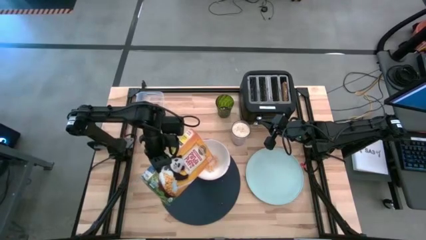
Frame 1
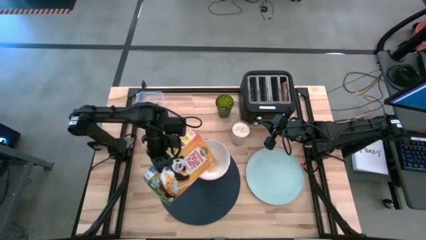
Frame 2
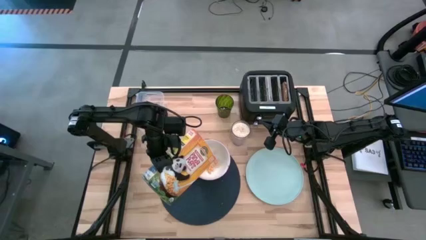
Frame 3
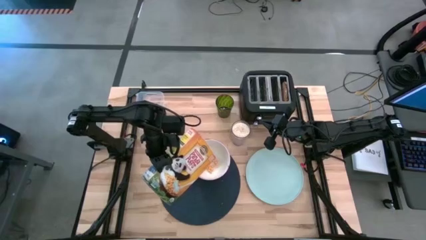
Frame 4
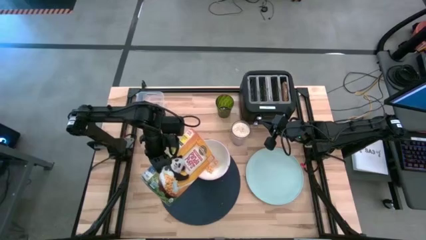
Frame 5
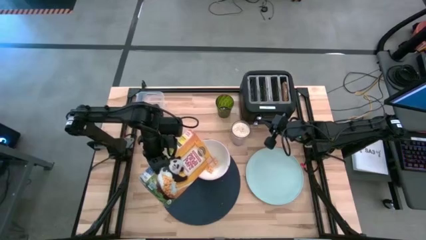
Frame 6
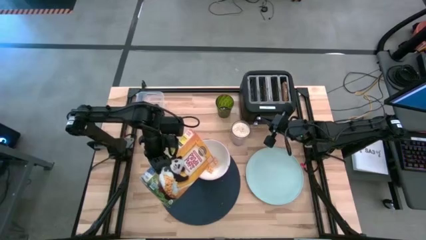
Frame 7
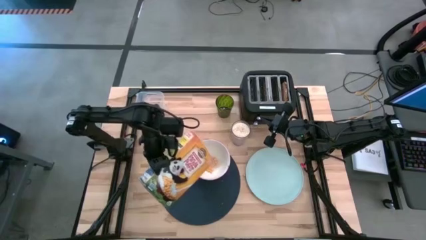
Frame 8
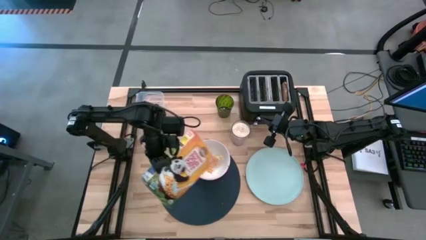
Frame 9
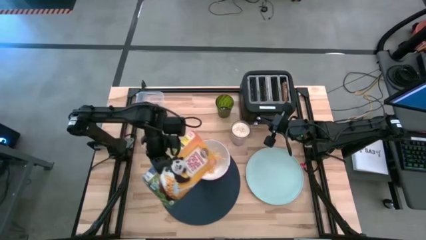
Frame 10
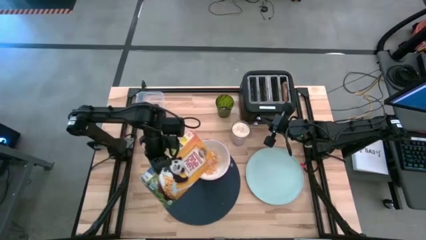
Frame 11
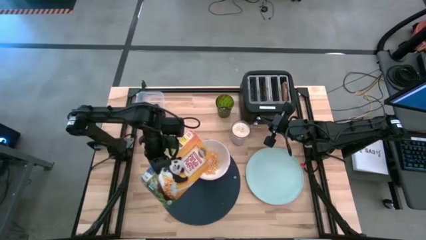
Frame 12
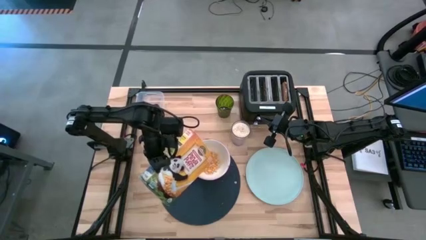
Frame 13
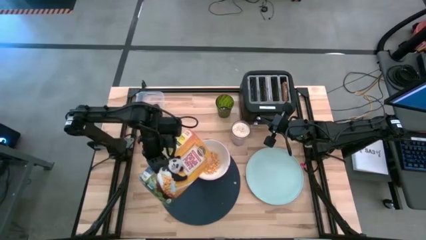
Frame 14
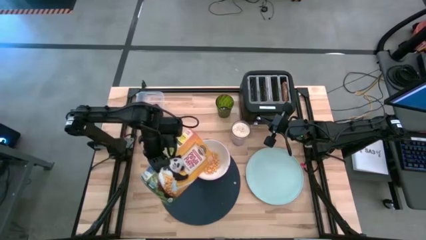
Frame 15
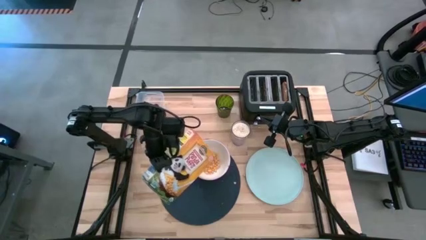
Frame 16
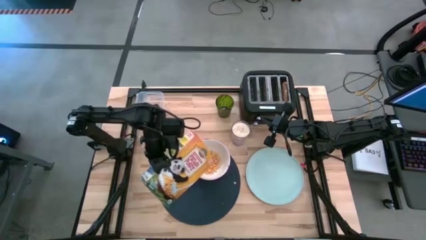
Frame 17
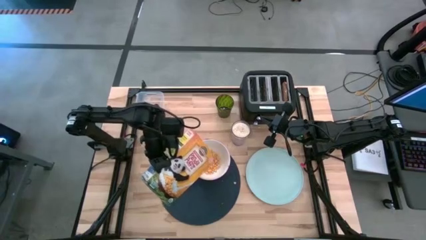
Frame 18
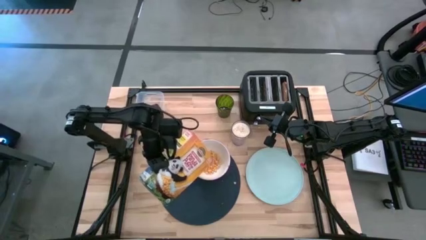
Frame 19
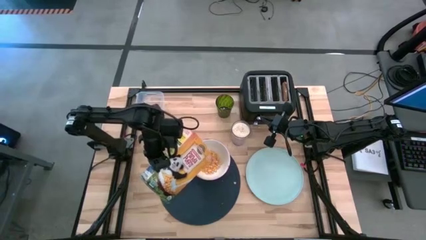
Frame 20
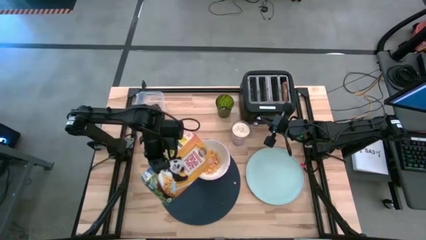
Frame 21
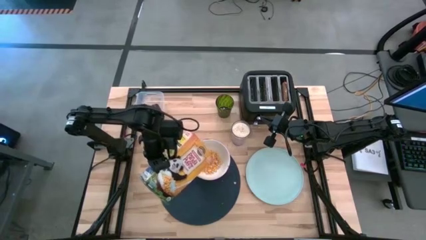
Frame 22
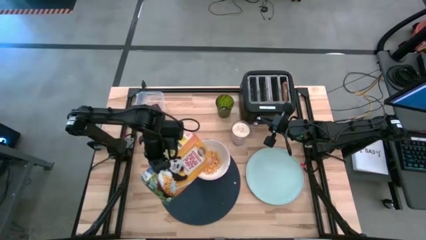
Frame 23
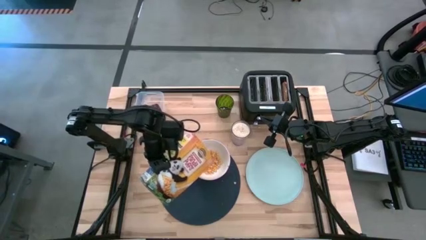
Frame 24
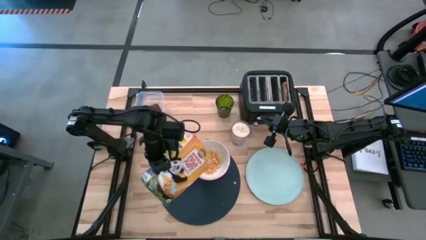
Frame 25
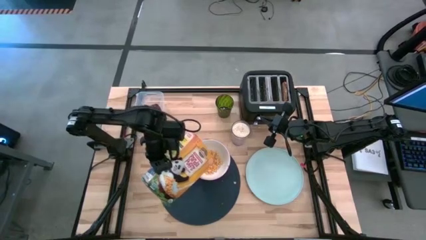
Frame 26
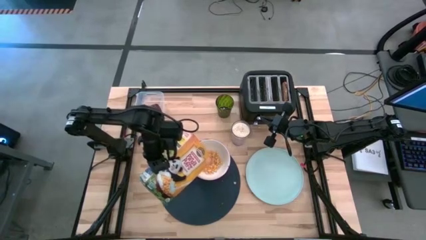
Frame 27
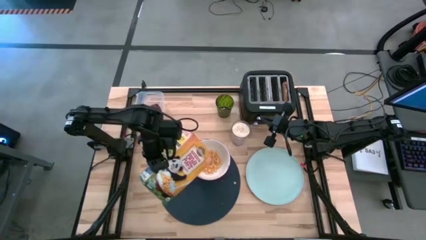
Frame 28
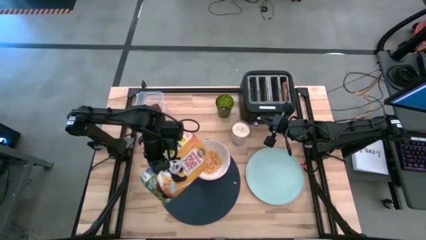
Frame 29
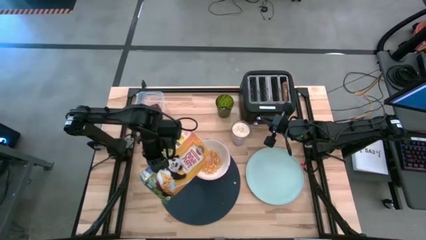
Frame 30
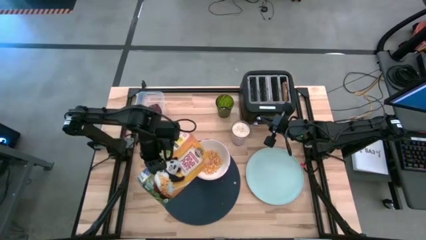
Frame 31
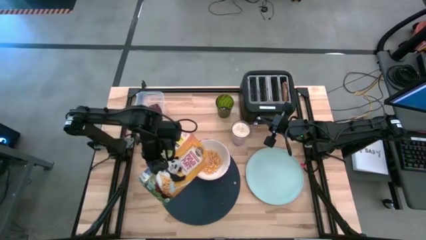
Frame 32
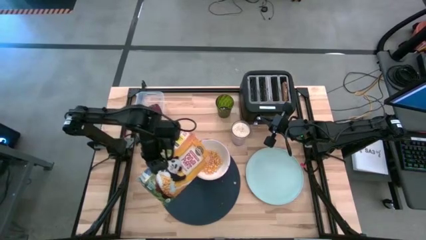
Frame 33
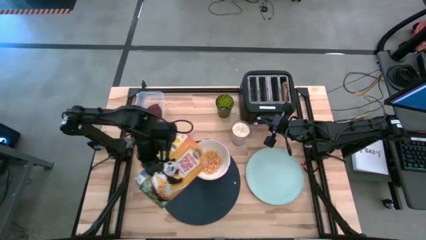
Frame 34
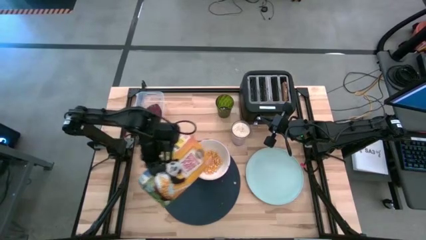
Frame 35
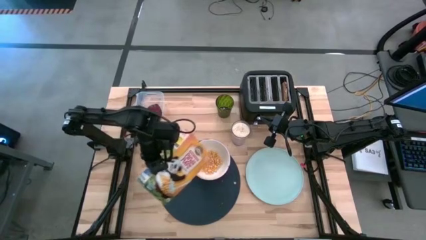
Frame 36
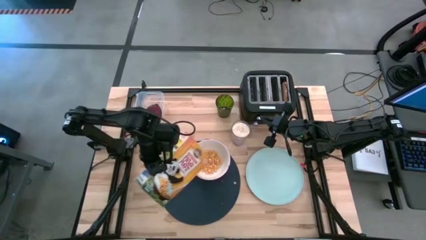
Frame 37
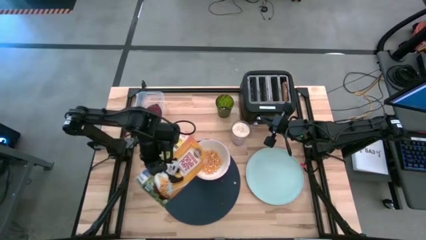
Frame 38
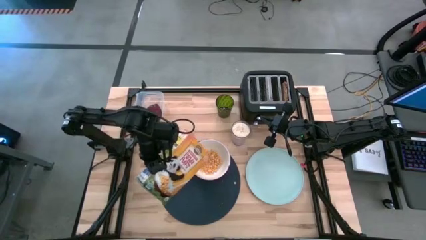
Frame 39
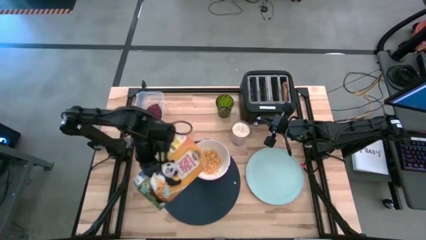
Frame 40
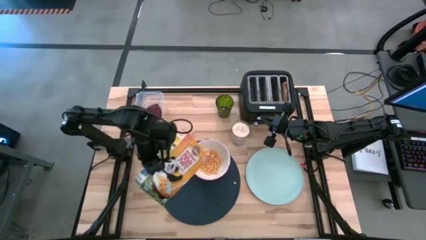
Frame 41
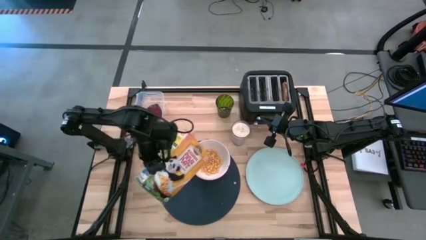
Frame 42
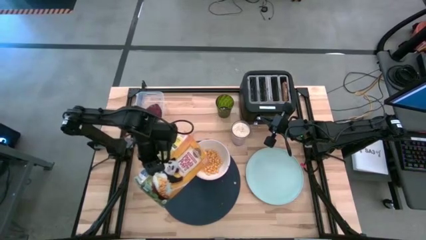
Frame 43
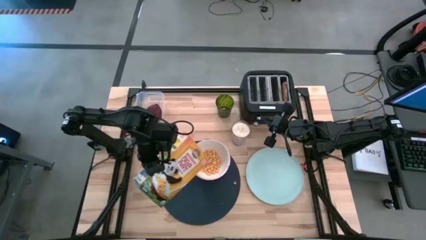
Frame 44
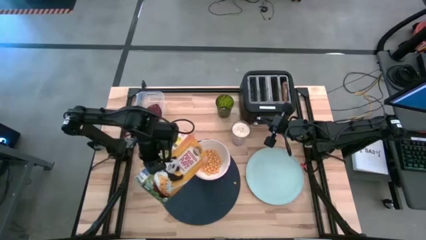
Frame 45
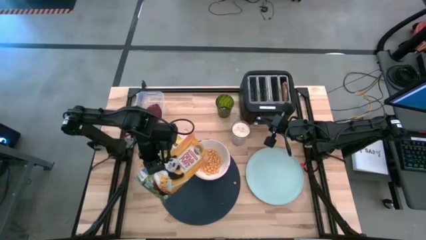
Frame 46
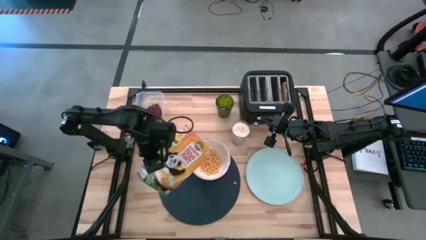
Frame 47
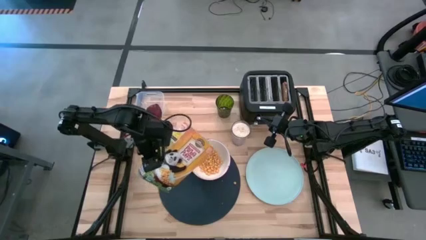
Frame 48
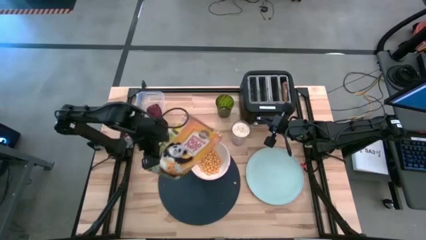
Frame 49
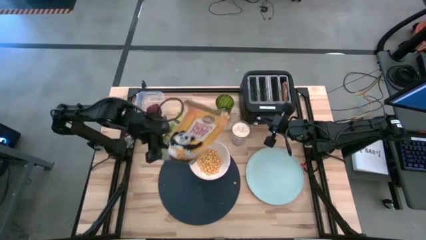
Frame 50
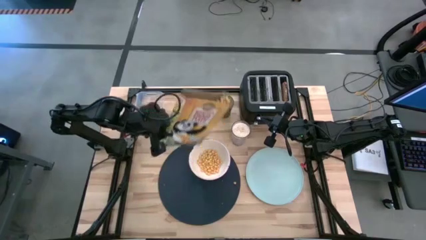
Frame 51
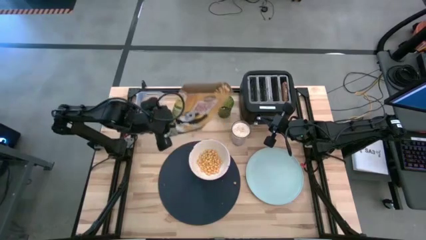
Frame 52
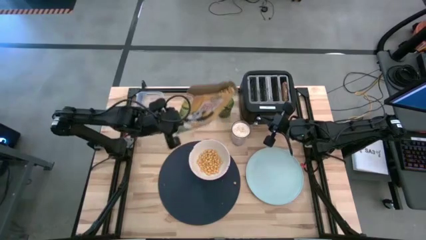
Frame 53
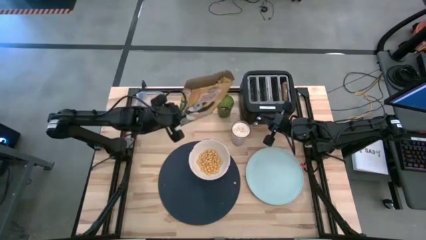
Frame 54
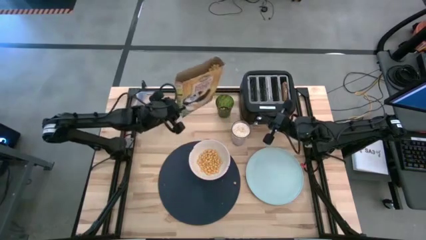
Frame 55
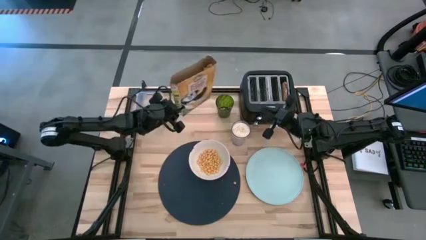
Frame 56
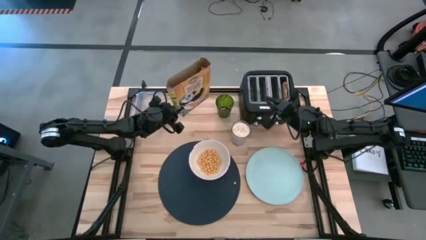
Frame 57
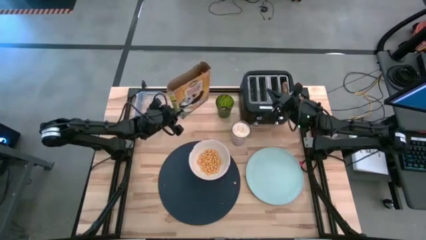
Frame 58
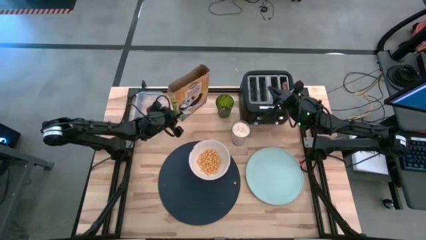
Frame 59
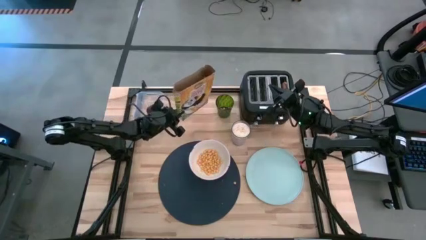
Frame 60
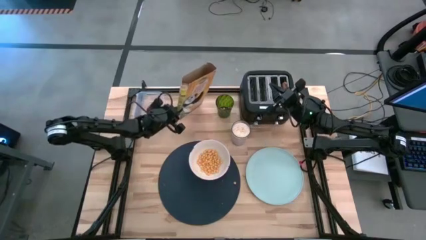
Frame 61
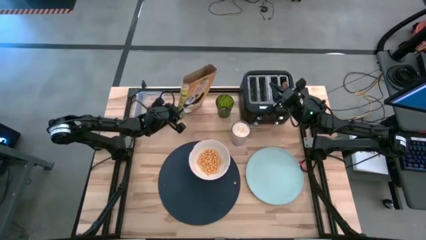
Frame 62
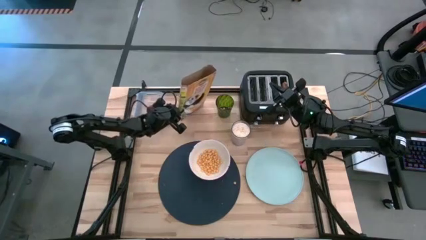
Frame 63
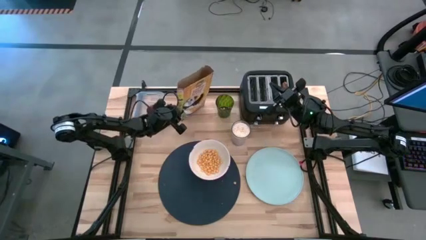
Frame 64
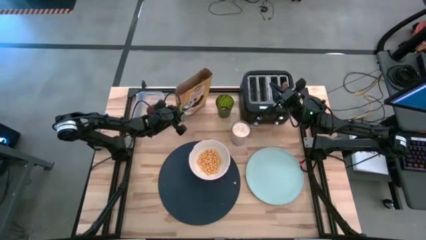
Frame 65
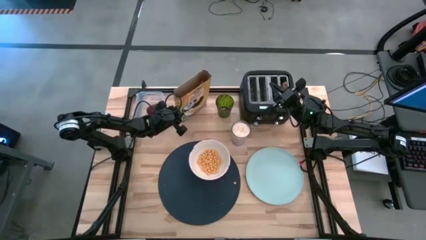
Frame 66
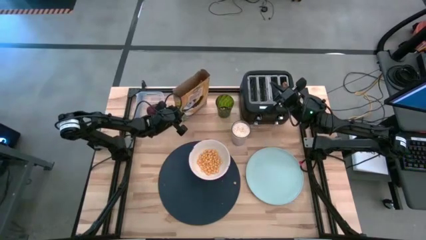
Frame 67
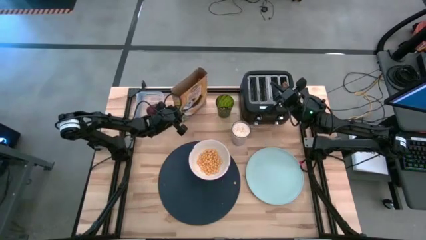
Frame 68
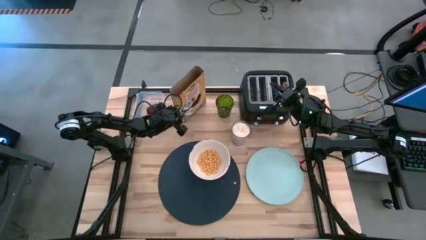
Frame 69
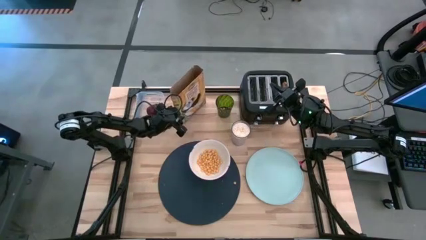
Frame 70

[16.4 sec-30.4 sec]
Task: Arrange a breakfast setting
Pour the cereal from the yellow cereal box into the white bowl
